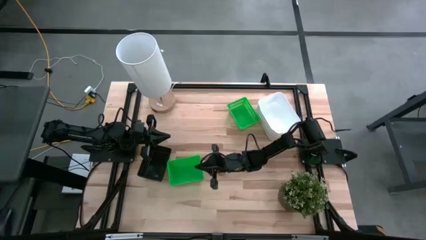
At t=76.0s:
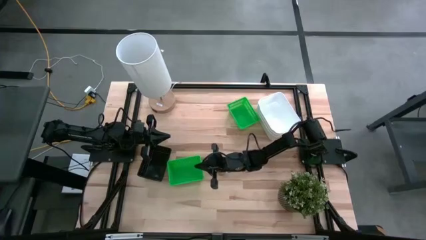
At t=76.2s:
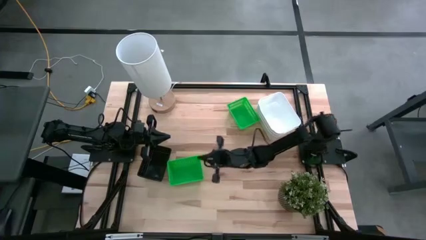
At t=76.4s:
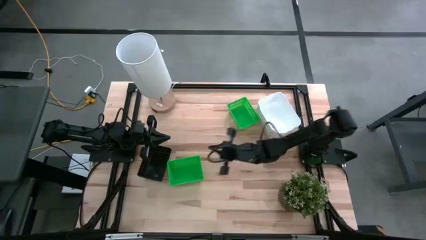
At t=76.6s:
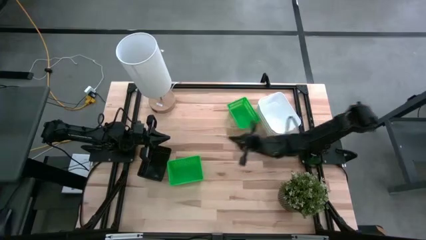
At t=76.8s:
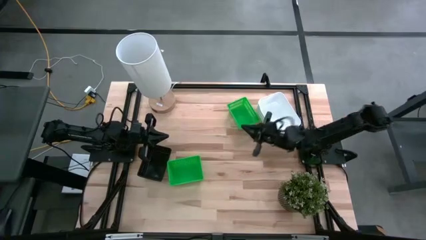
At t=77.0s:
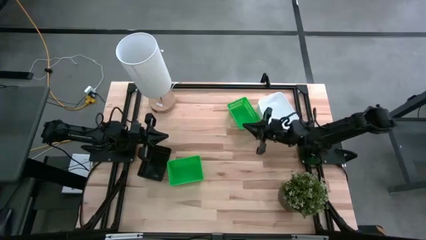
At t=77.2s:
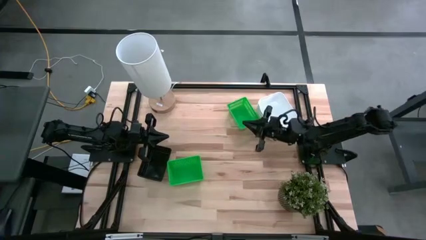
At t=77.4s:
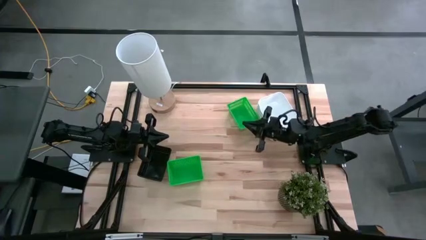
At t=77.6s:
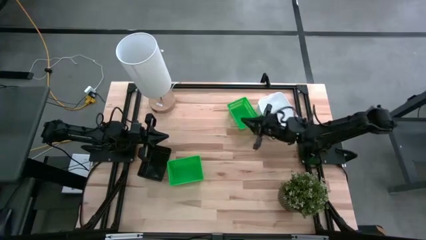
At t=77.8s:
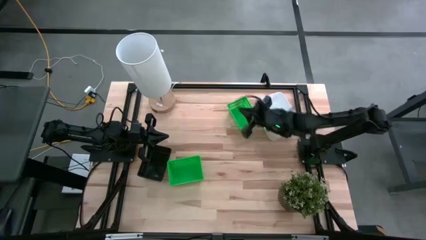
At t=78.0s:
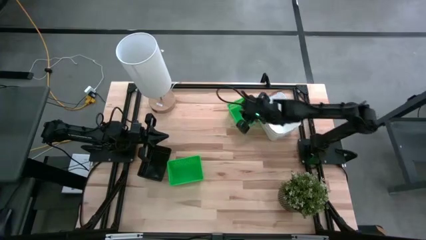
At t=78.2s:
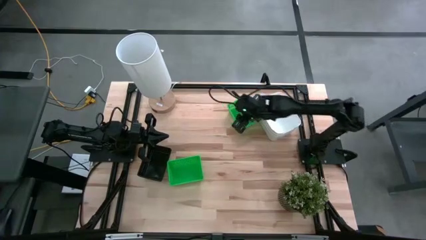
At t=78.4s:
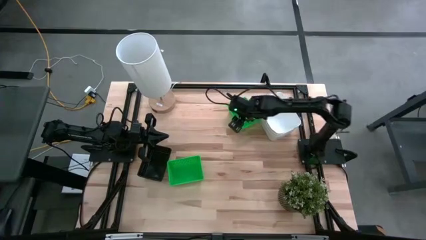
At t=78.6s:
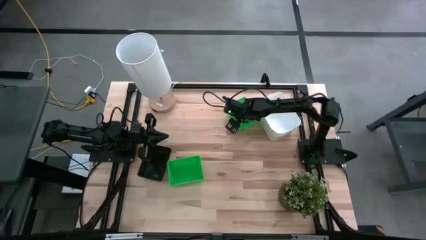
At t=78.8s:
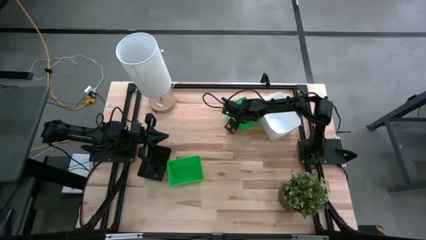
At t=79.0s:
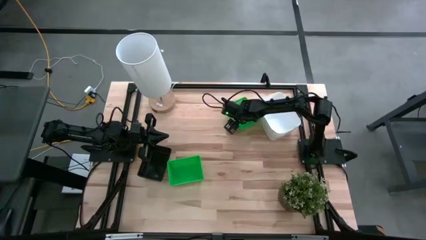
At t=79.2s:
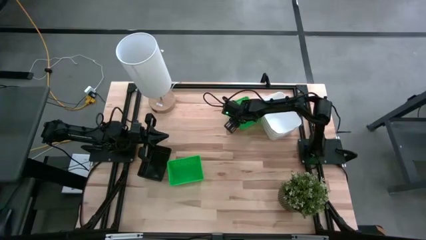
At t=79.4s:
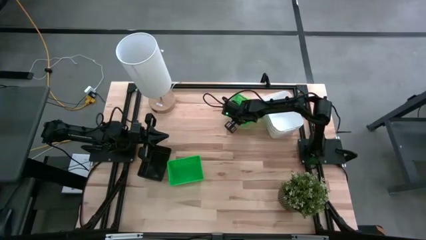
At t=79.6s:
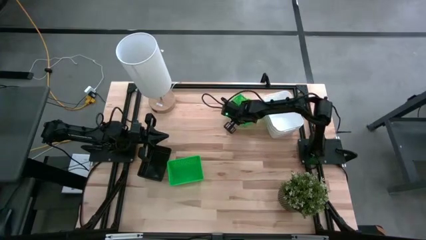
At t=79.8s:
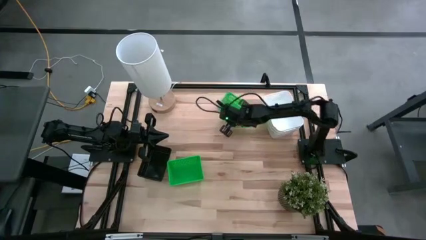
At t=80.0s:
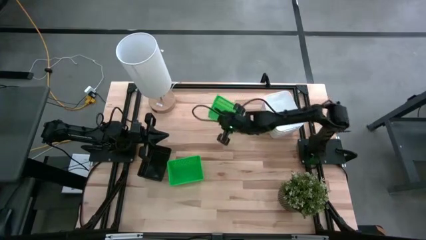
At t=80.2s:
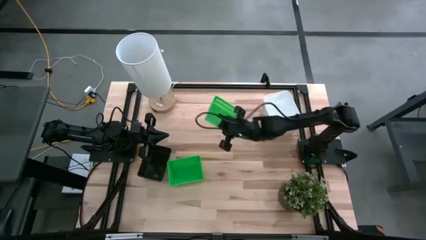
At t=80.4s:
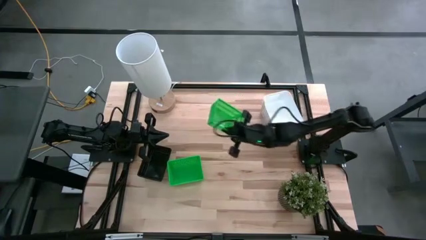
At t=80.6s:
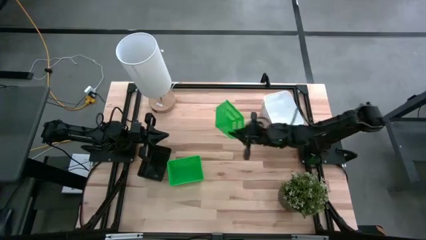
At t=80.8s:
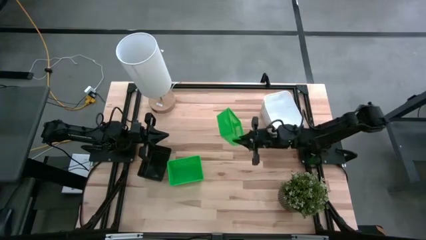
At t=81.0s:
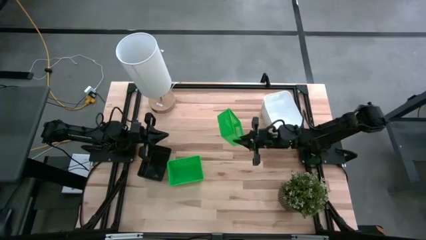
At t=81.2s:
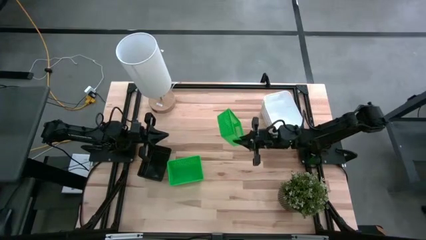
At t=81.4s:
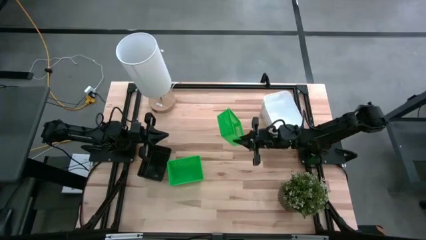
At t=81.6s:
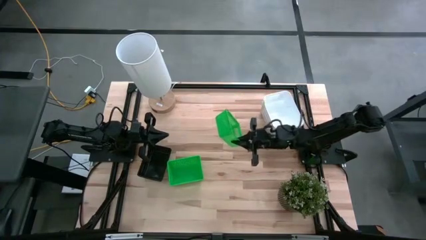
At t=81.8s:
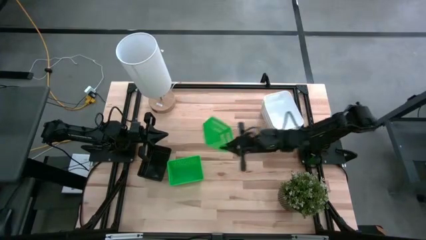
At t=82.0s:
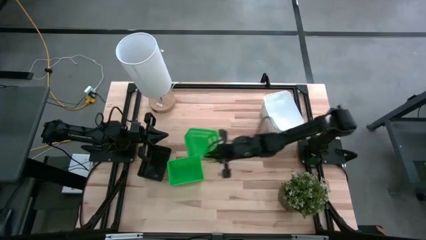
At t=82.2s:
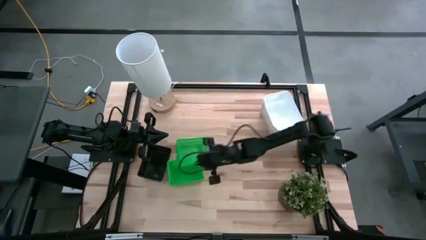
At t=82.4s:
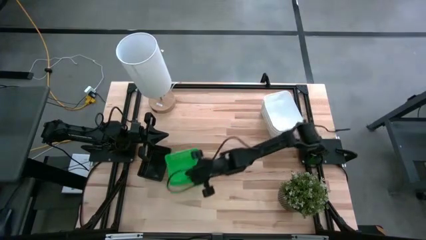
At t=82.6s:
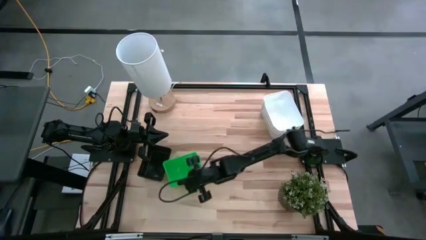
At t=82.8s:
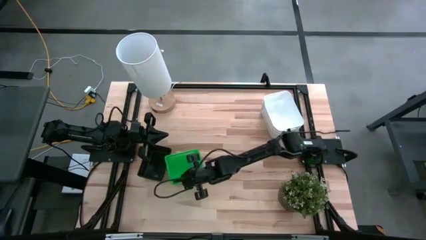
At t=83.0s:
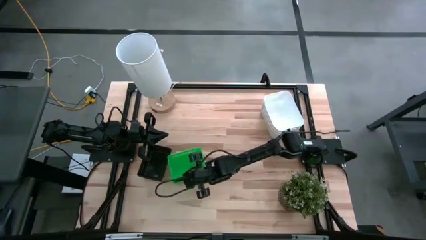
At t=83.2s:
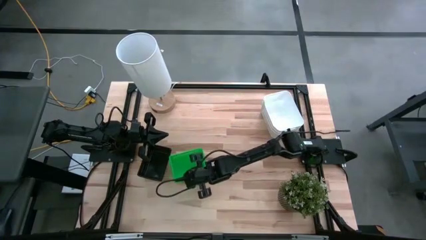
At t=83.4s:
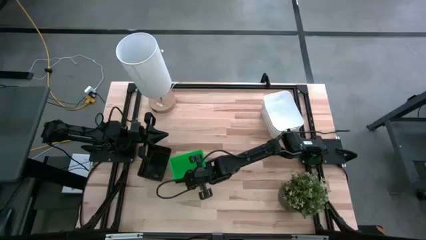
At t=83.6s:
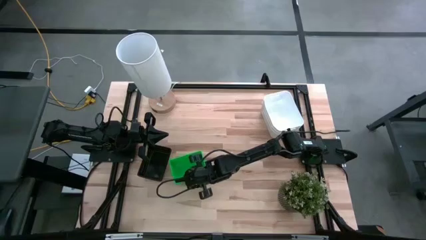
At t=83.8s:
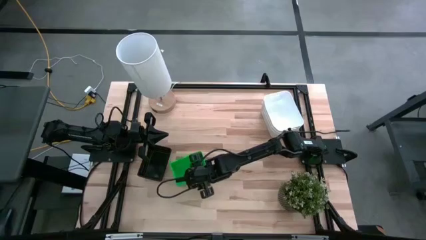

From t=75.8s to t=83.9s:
Stack the top green bin into the bottom stacked green bins

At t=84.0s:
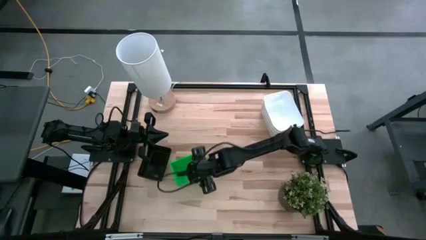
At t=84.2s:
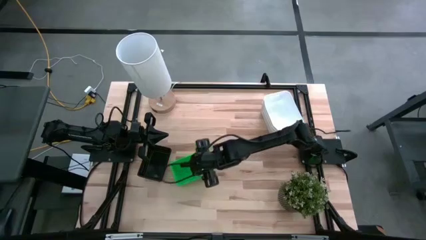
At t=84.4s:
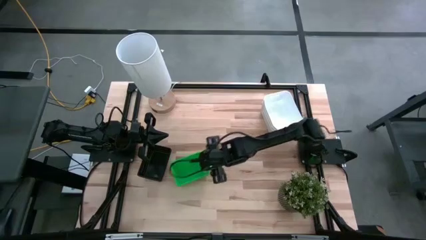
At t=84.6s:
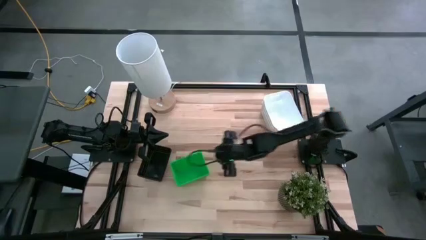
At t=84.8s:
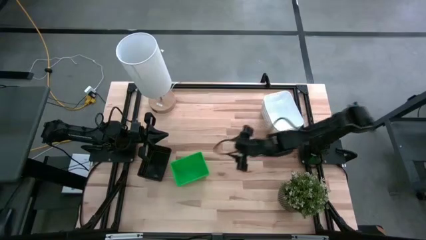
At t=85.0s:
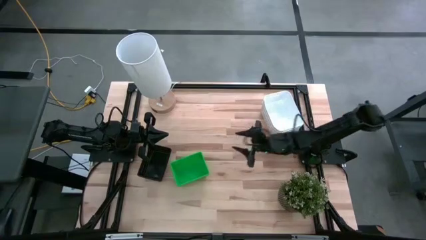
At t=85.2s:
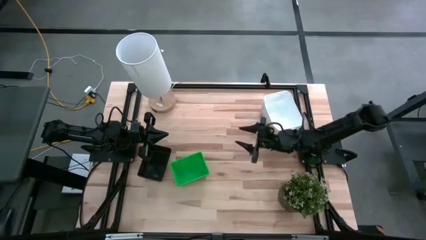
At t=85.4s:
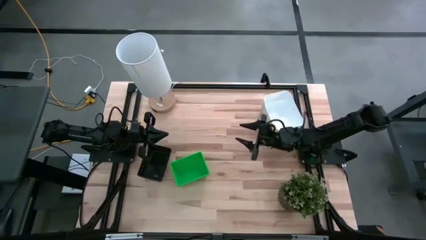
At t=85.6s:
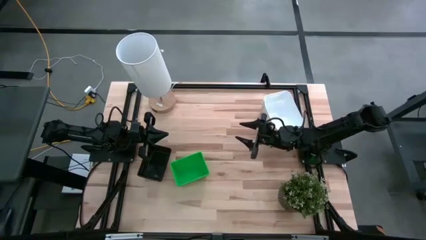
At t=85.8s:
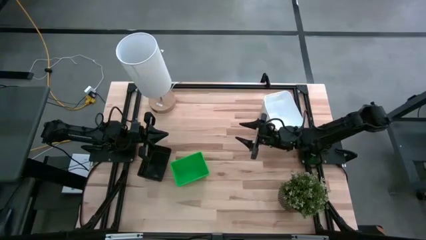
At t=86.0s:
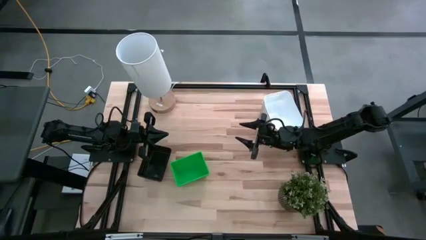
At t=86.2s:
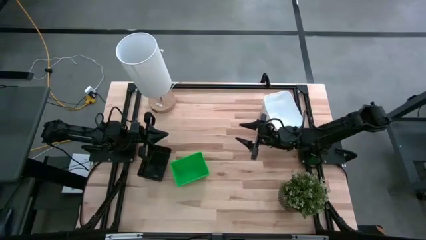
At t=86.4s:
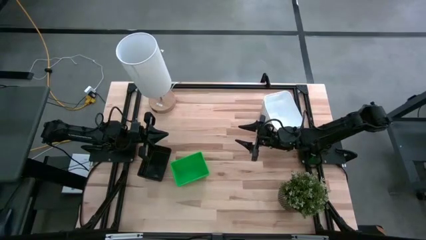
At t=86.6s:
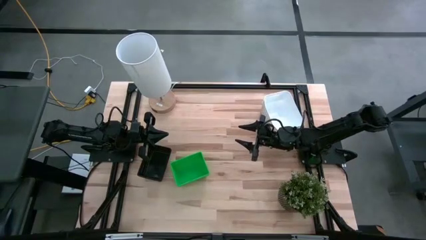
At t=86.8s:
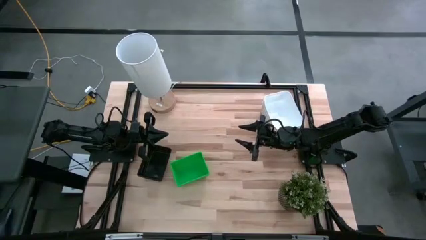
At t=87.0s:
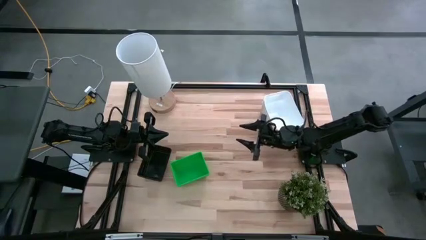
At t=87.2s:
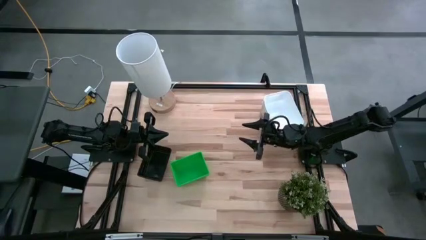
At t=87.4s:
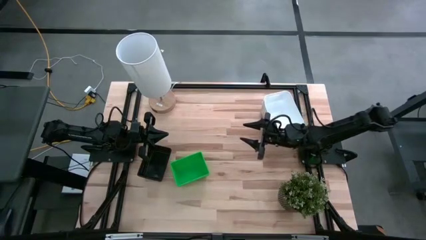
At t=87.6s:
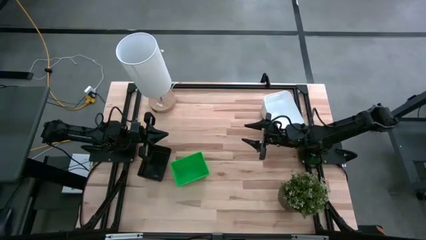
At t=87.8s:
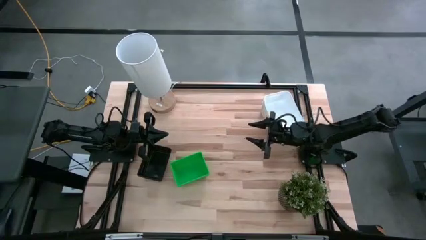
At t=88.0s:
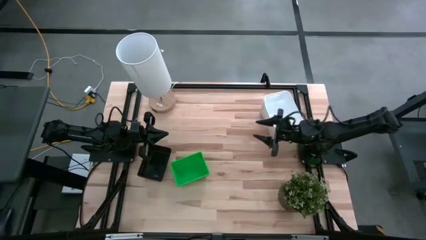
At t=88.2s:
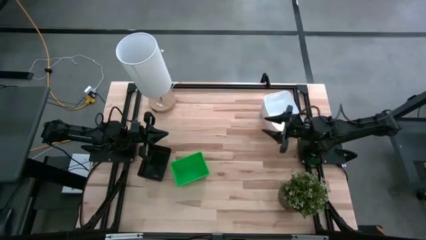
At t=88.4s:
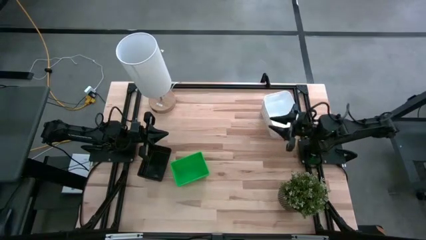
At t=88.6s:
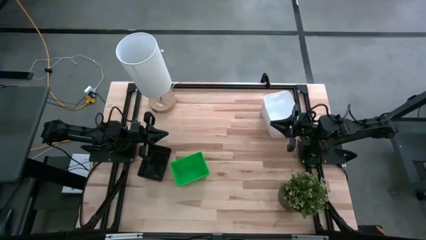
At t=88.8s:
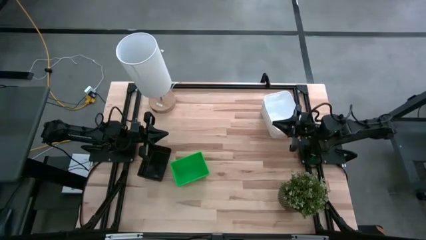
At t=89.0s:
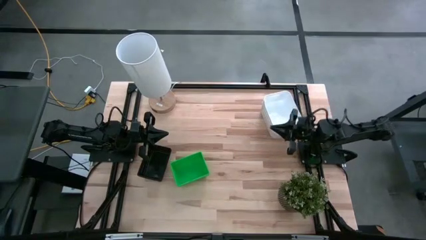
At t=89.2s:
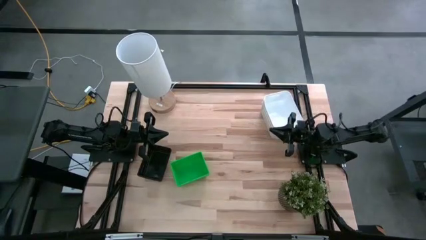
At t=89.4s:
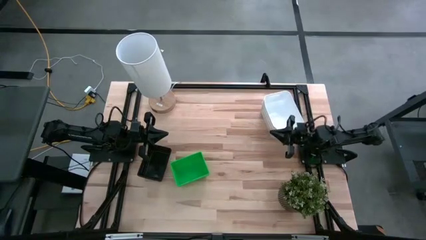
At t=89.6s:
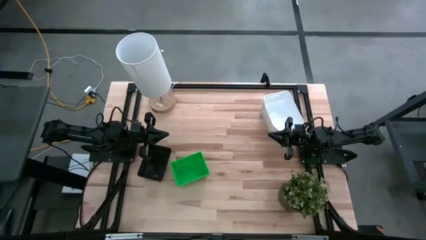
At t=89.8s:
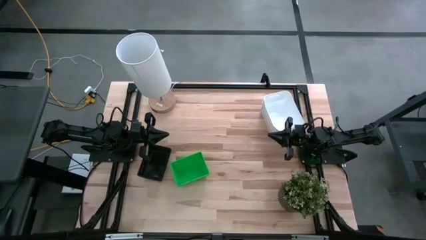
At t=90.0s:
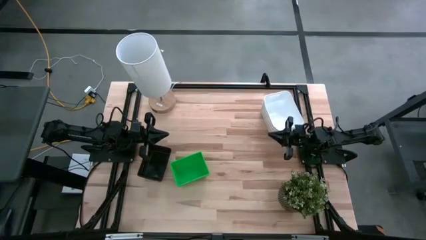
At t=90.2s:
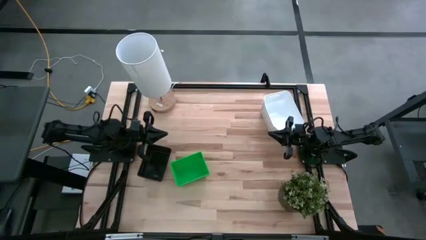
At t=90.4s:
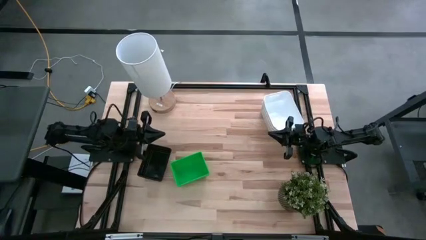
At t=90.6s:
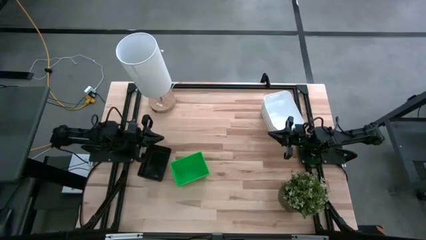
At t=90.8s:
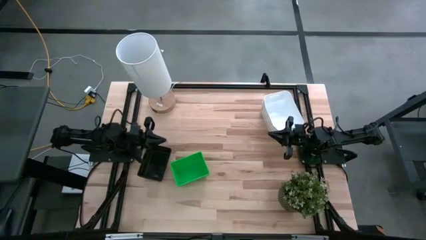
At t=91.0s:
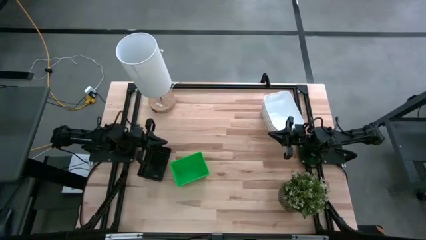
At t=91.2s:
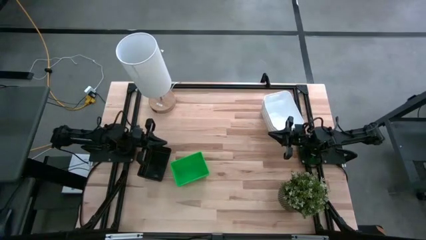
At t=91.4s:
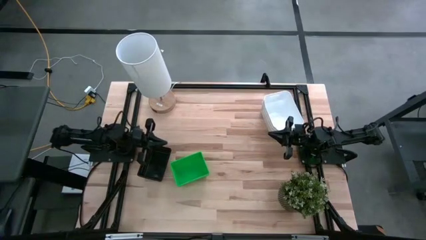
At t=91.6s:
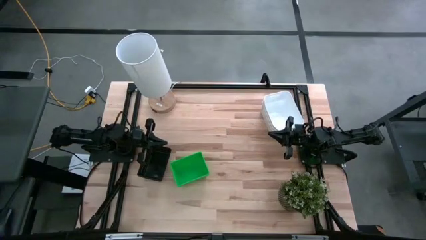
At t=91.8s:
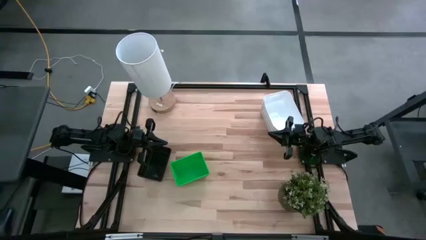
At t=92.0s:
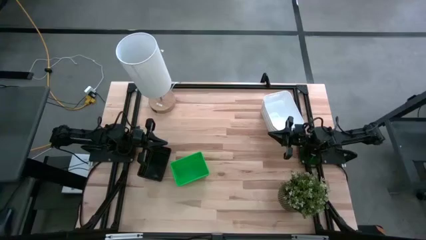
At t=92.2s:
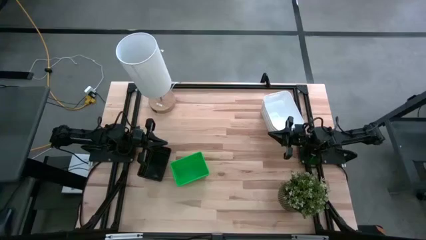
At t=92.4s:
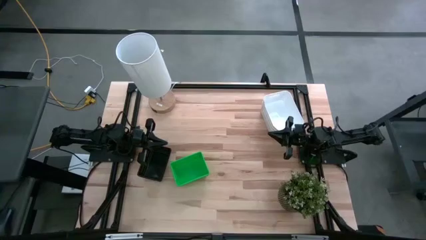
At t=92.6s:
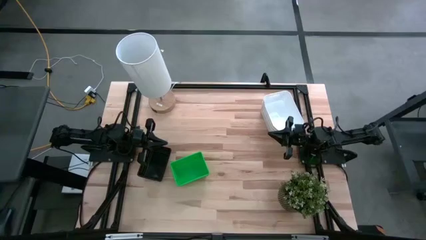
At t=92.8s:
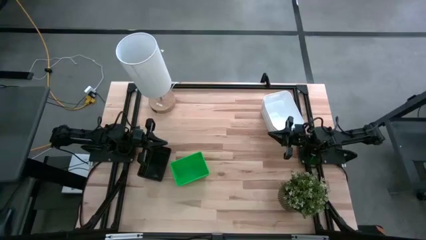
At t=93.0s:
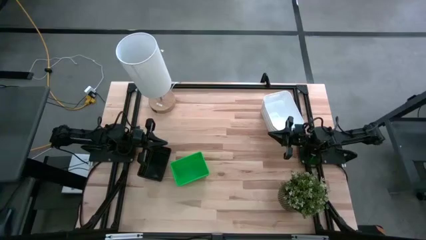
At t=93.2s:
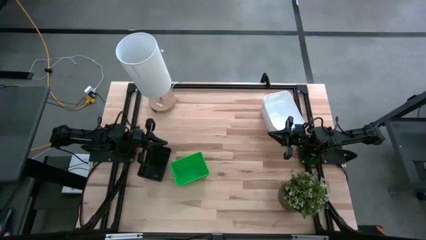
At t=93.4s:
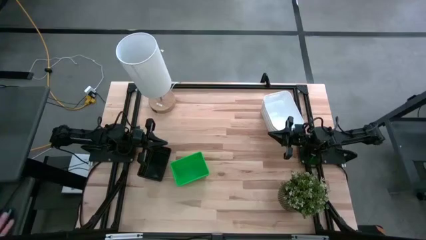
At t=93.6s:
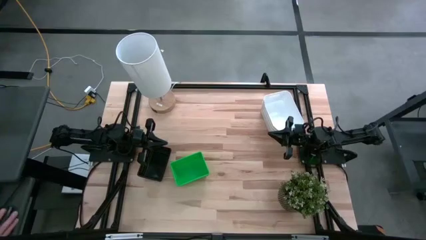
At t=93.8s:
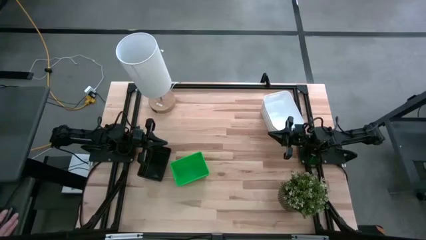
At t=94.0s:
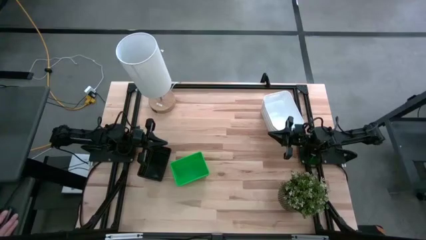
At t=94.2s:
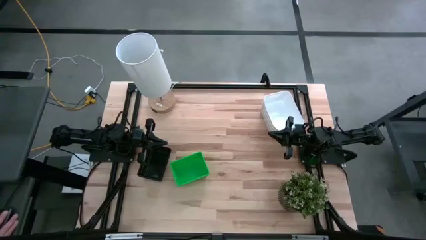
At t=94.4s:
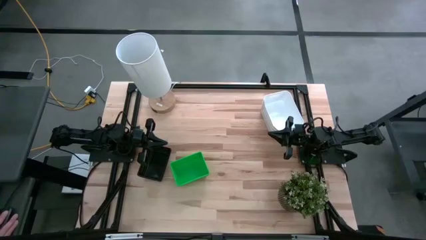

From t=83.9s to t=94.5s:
Return to Home Position
